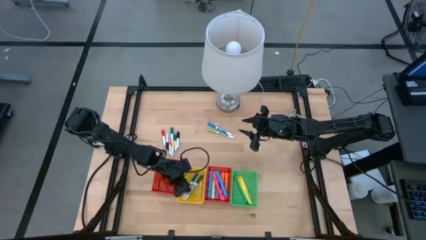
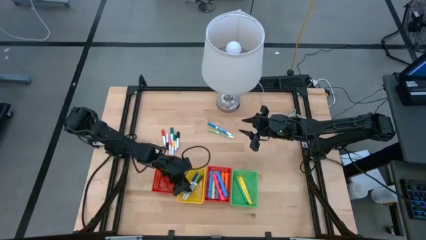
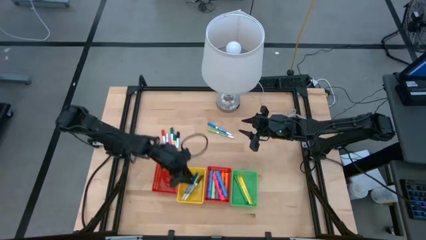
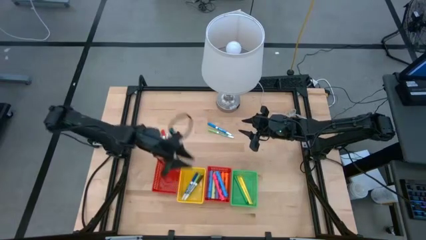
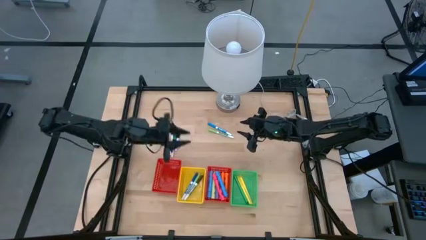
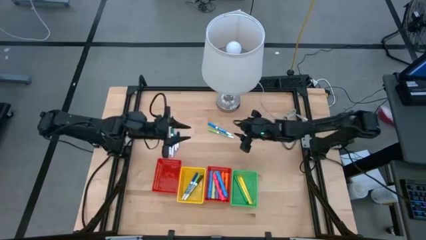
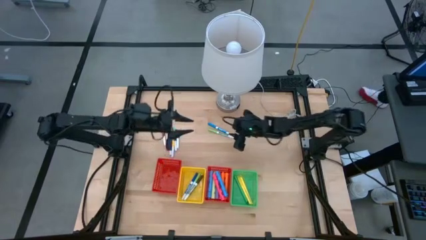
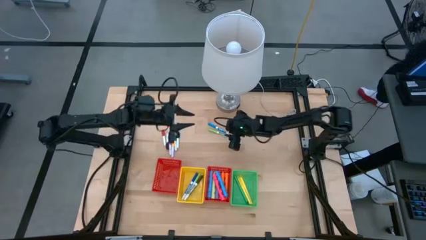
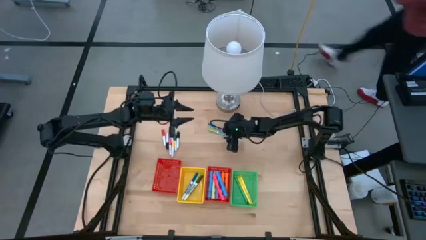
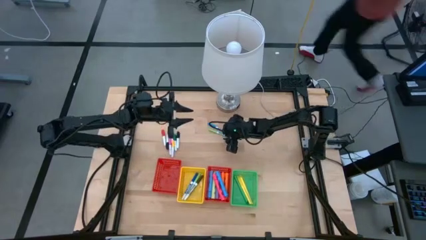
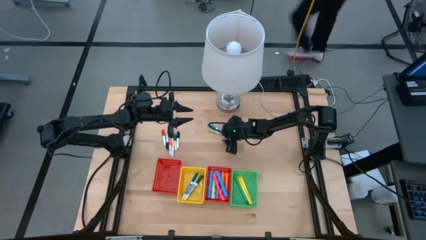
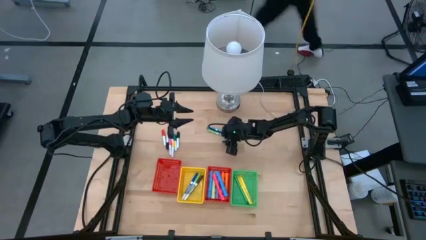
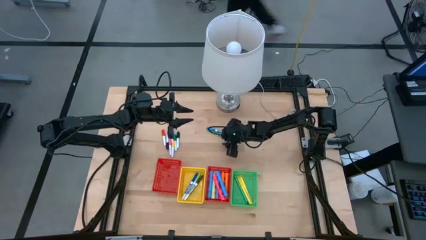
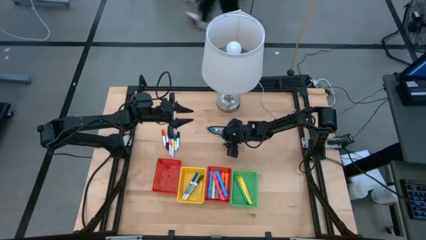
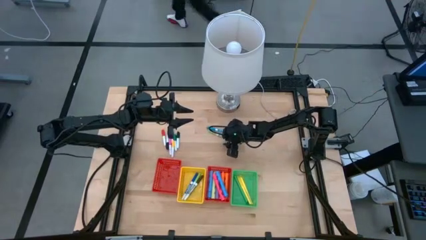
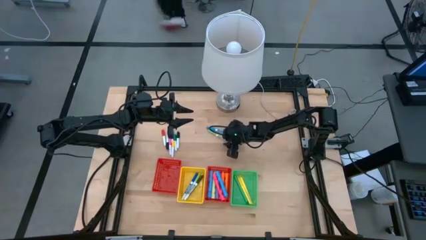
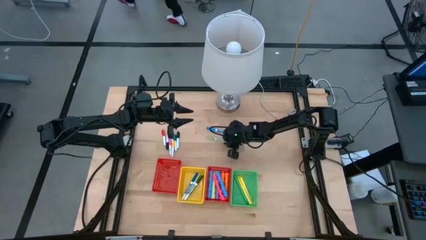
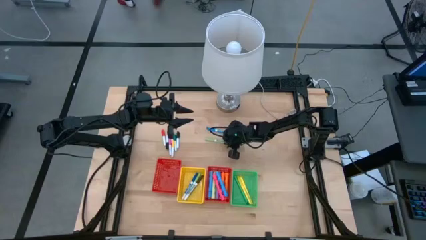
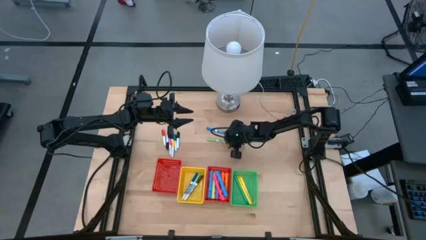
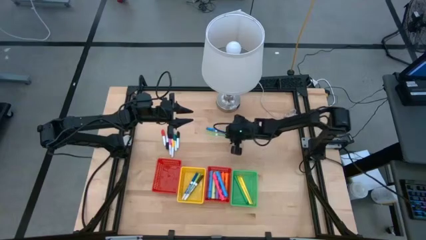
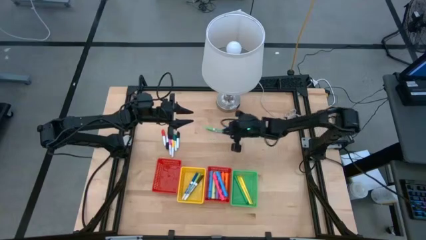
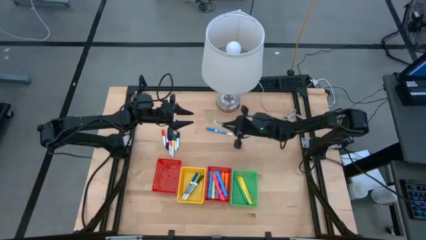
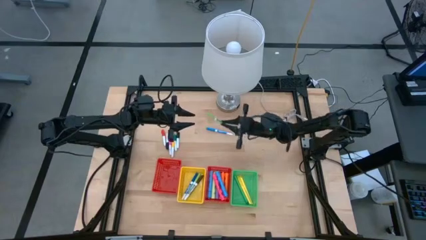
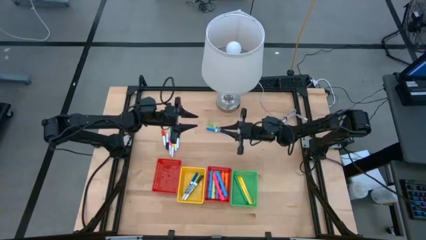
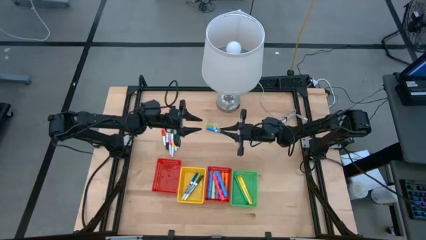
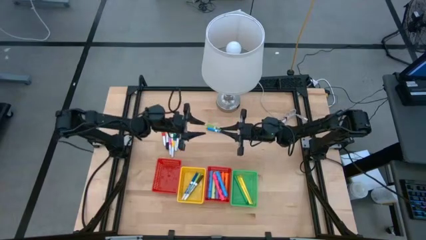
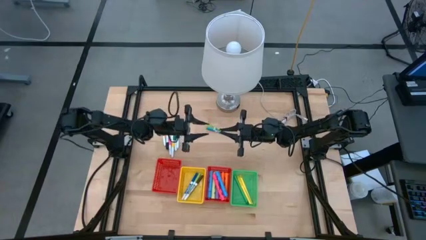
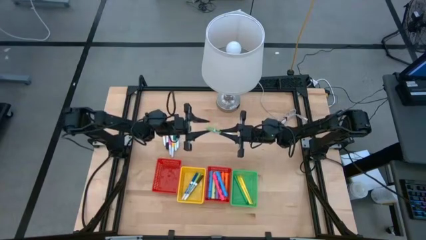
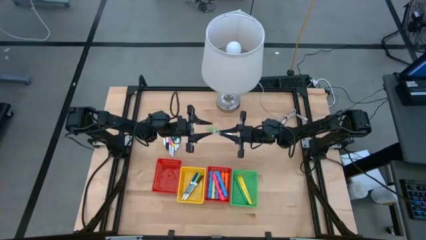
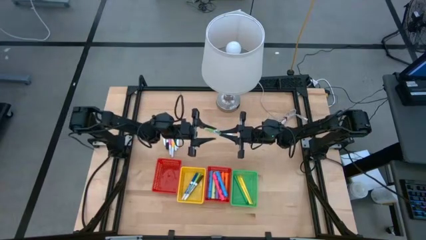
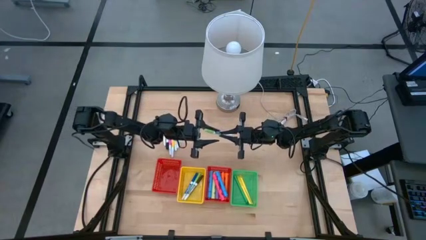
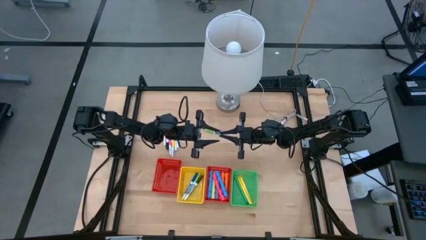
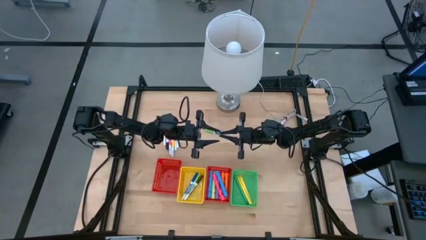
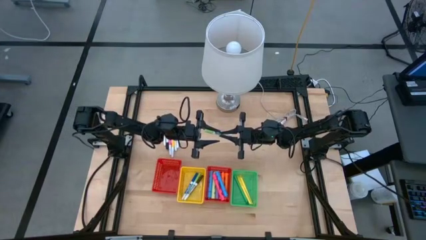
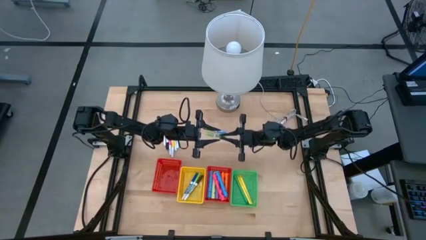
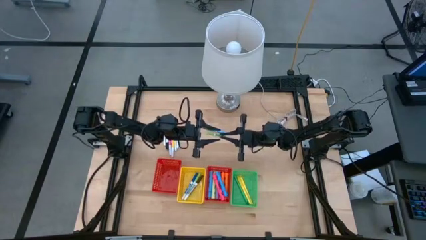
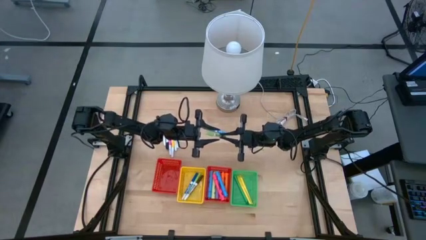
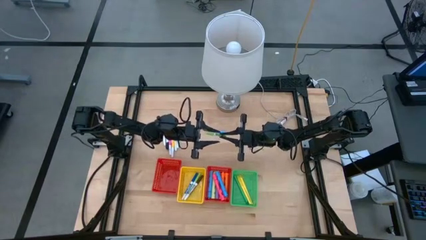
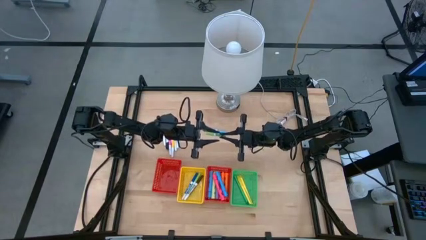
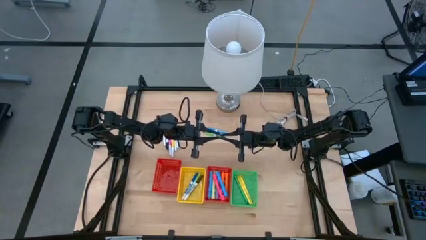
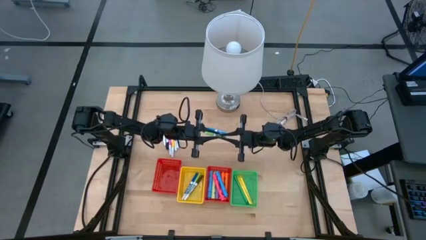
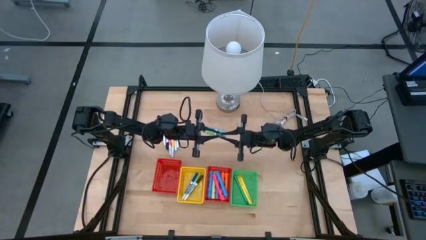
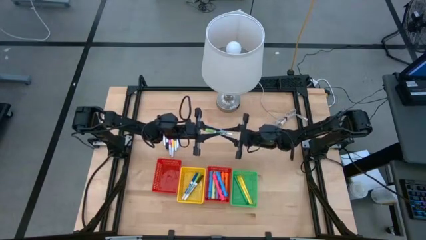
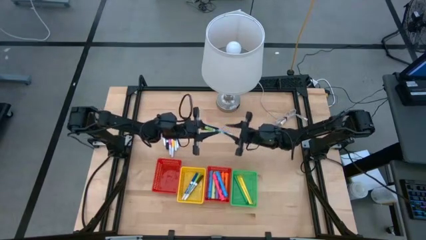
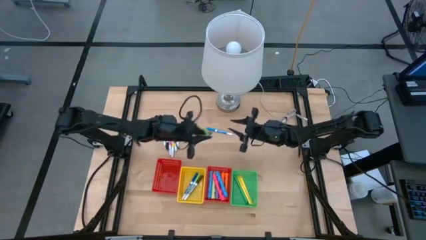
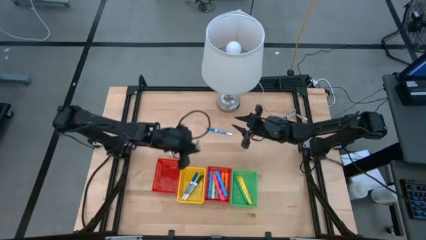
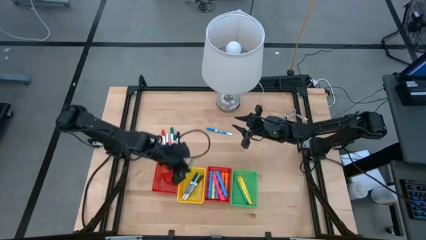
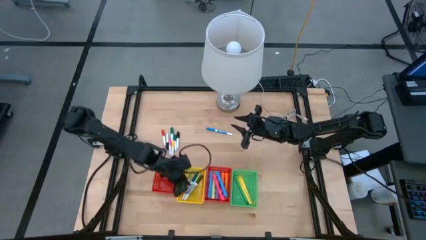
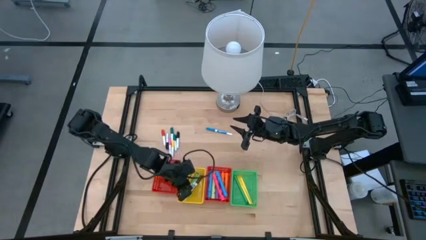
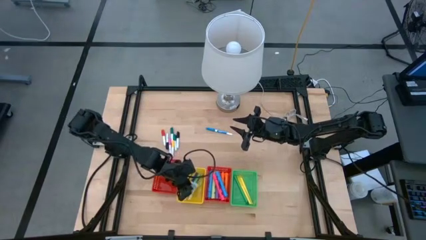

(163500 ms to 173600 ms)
Task: Pick & Place Markers
Put the green marker into the yellow bin

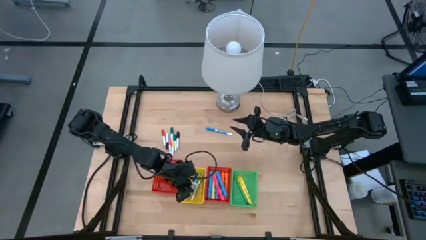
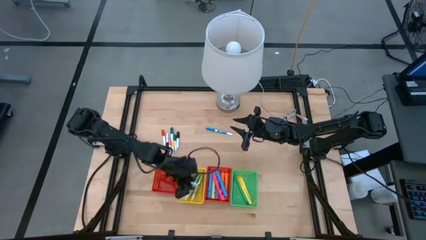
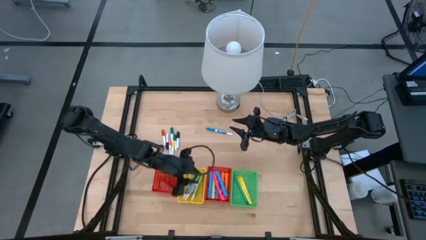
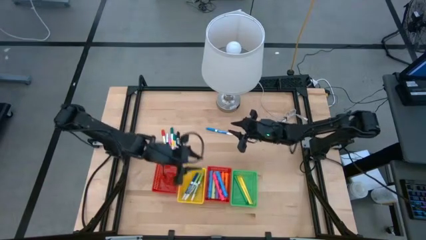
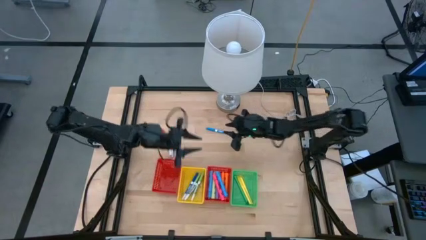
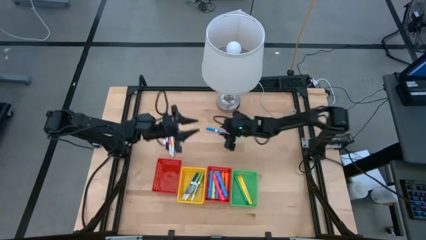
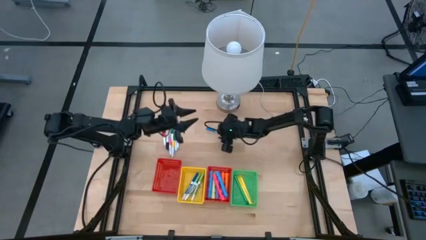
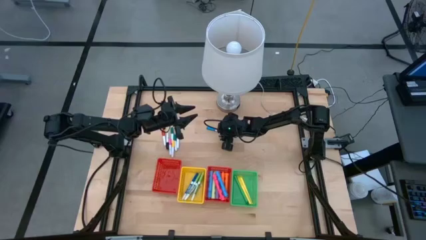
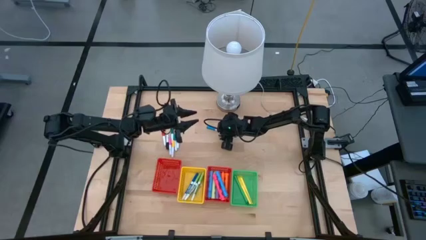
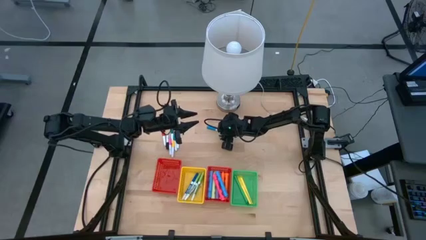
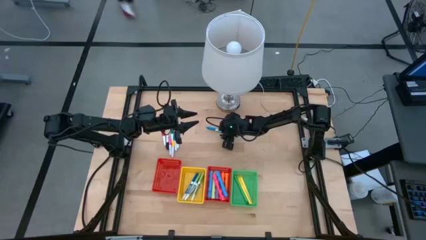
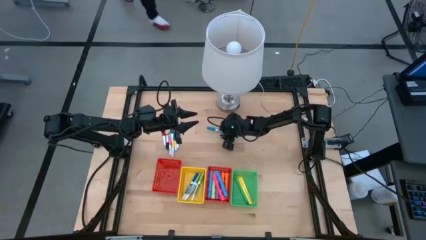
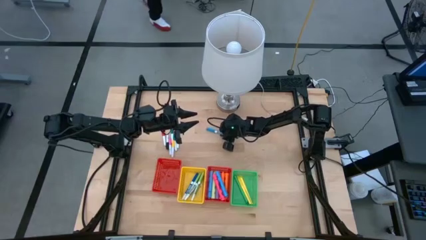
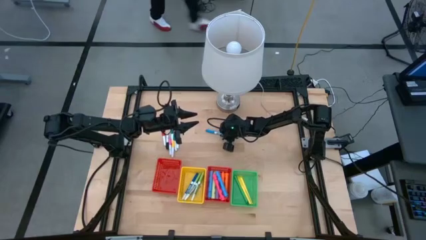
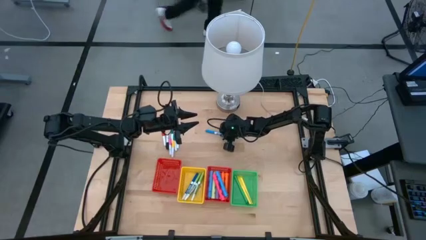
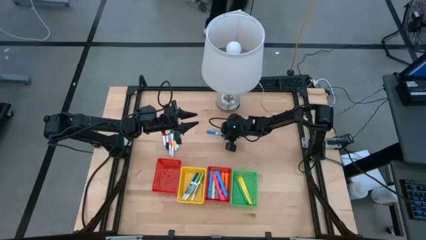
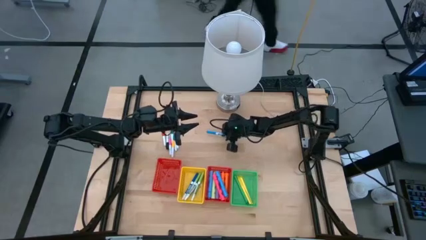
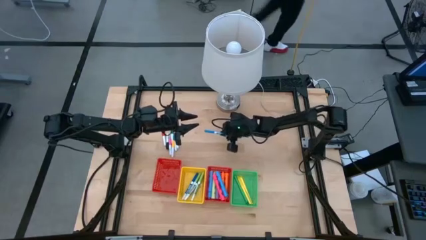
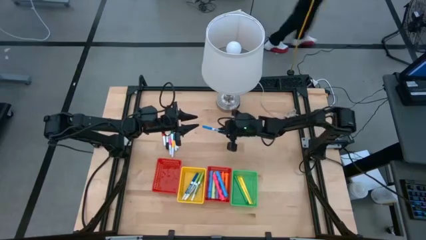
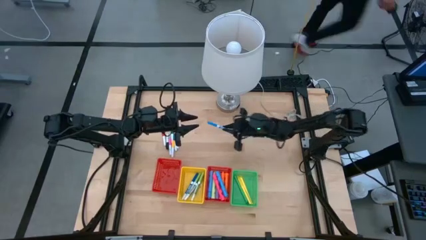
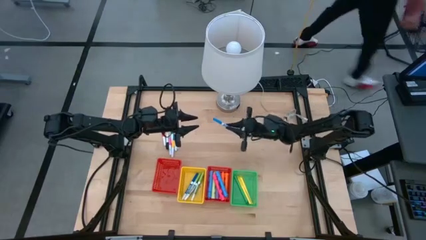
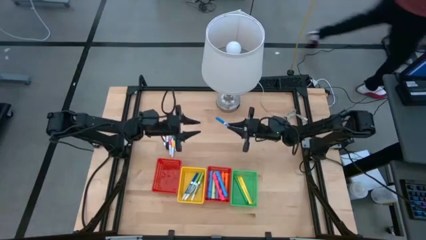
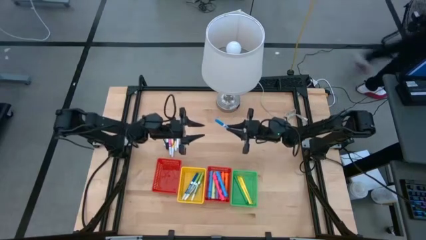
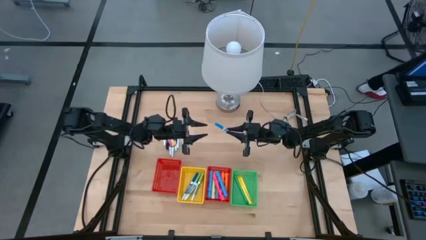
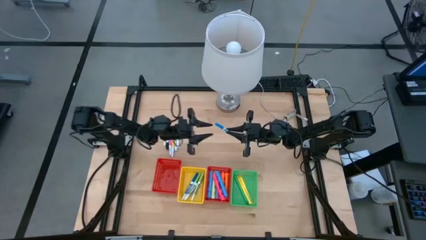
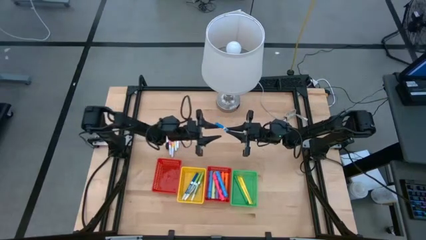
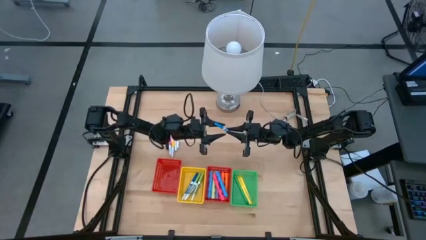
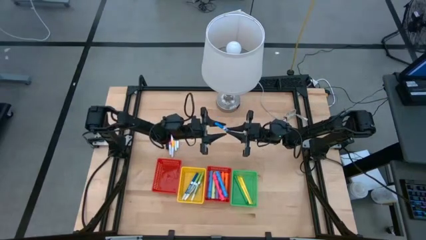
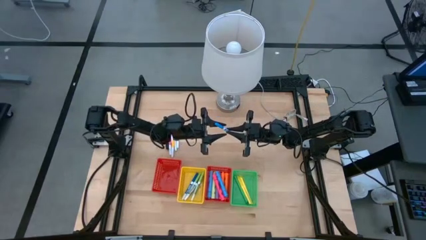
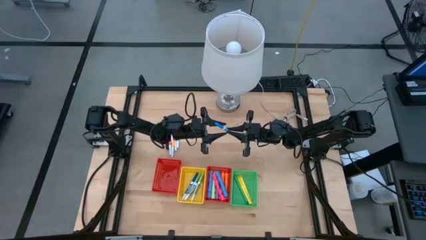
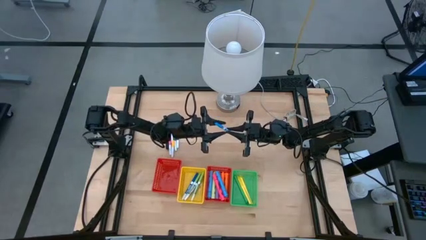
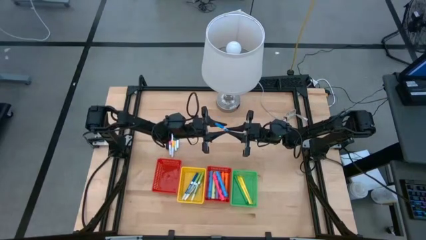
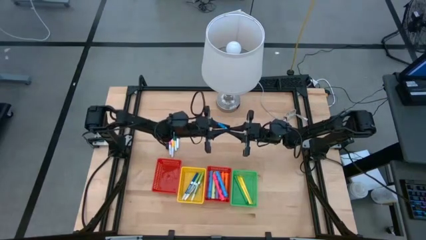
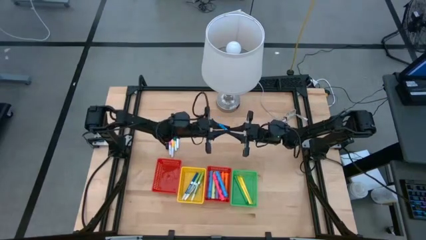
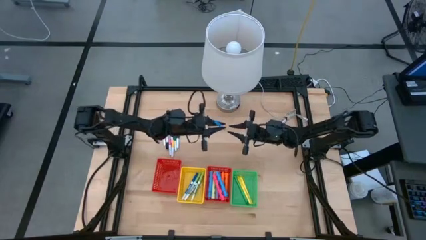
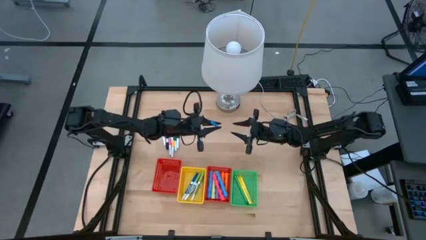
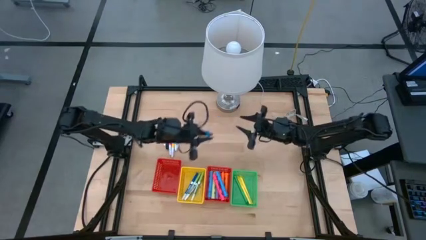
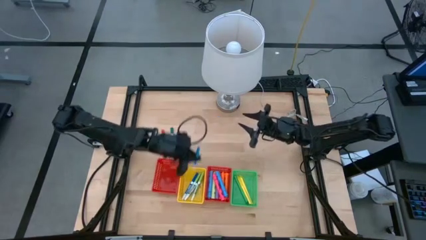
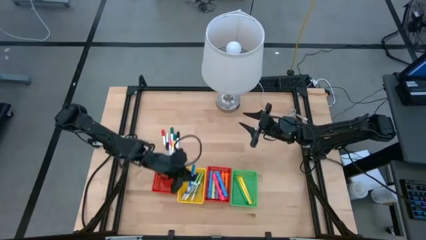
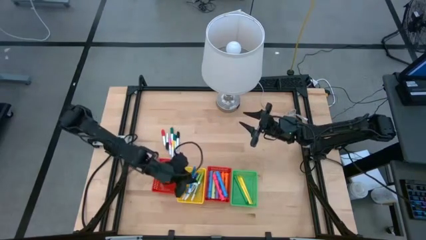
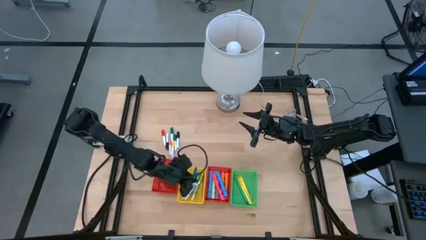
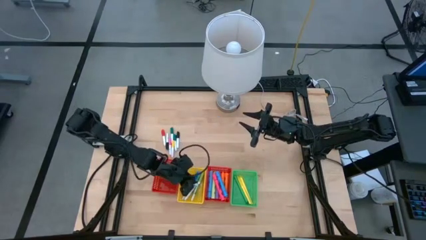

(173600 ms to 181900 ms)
Put the blue marker into the yellow bin
